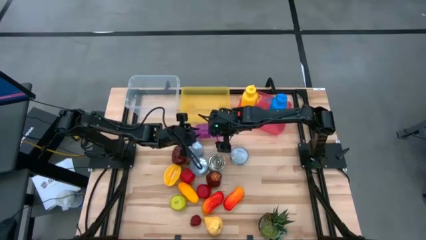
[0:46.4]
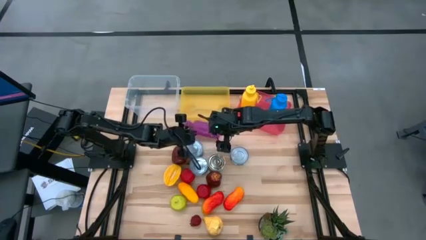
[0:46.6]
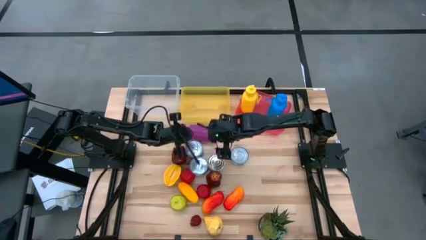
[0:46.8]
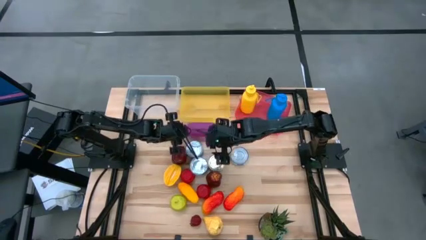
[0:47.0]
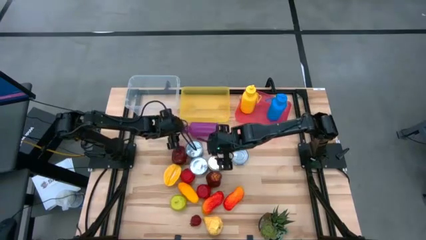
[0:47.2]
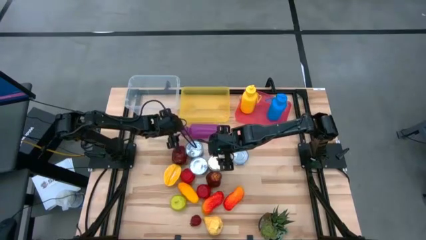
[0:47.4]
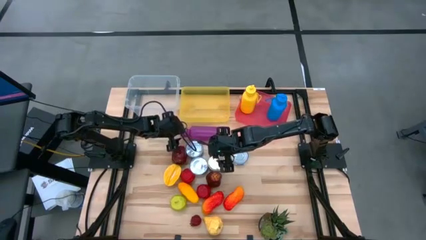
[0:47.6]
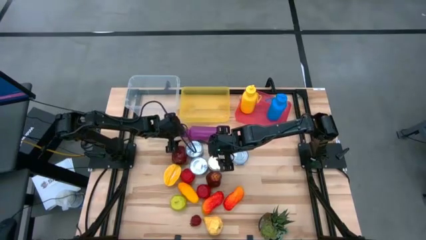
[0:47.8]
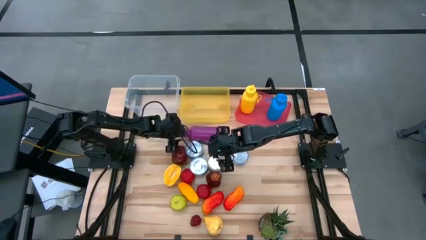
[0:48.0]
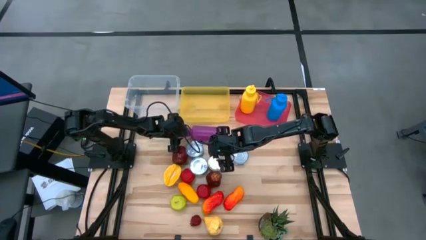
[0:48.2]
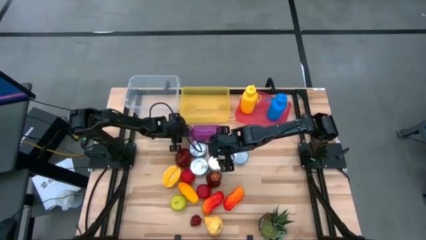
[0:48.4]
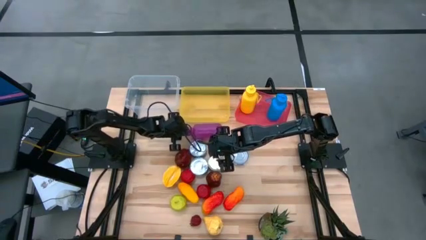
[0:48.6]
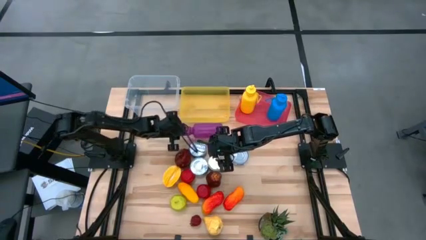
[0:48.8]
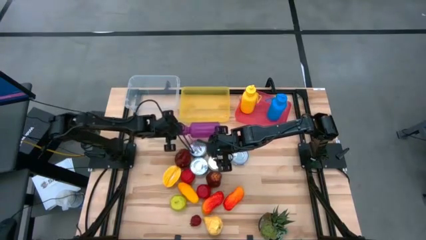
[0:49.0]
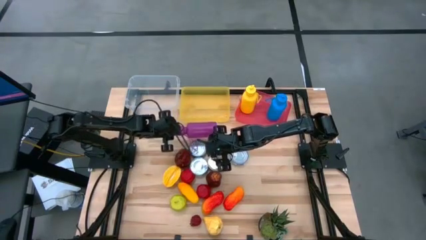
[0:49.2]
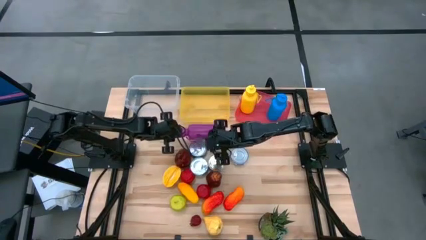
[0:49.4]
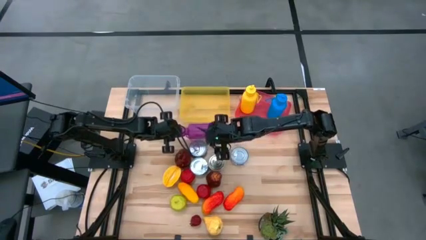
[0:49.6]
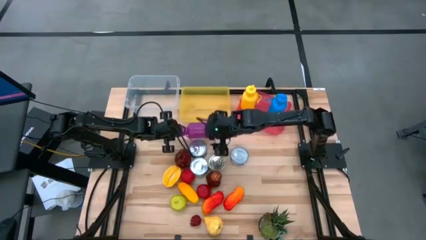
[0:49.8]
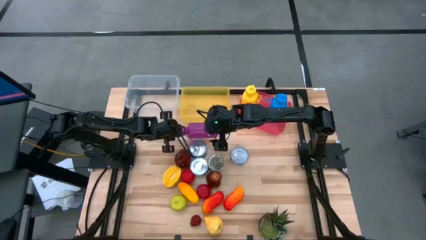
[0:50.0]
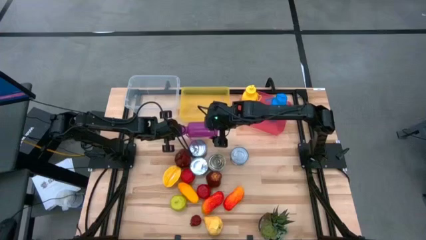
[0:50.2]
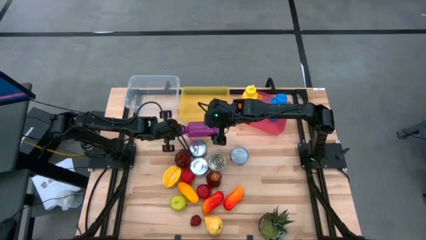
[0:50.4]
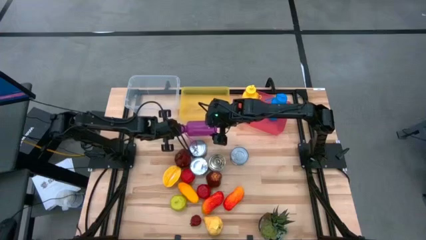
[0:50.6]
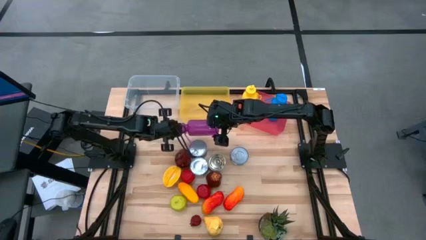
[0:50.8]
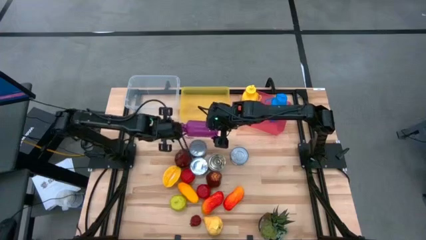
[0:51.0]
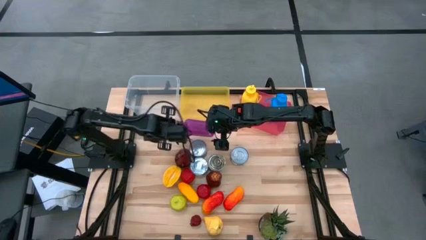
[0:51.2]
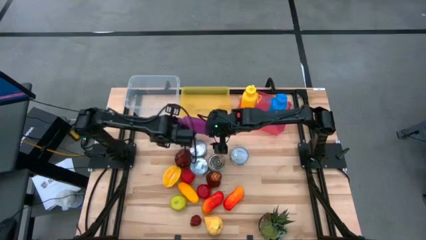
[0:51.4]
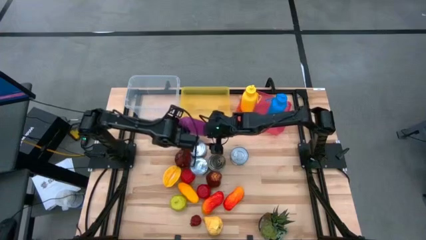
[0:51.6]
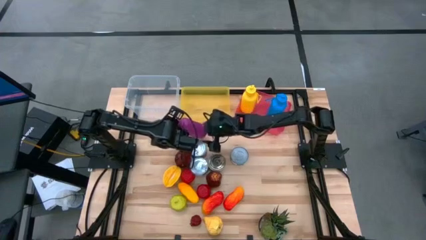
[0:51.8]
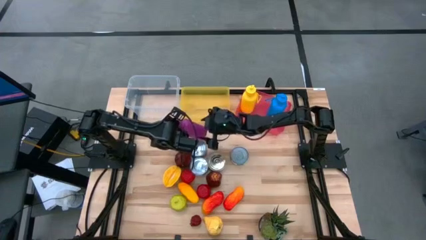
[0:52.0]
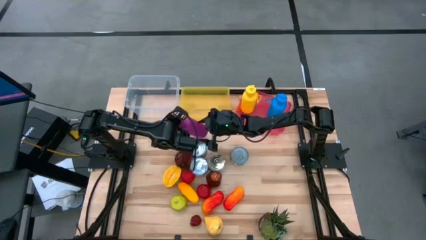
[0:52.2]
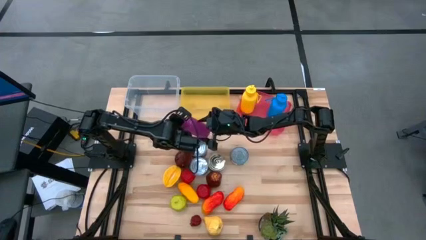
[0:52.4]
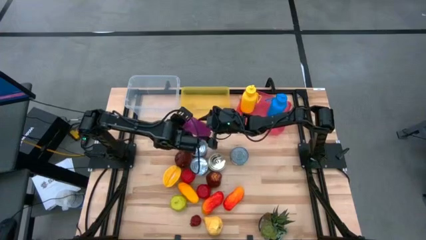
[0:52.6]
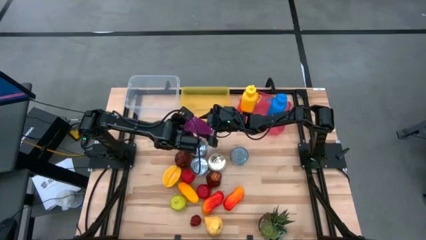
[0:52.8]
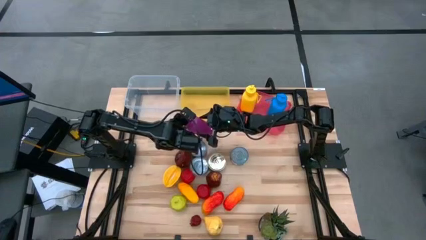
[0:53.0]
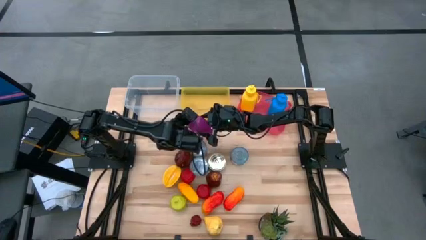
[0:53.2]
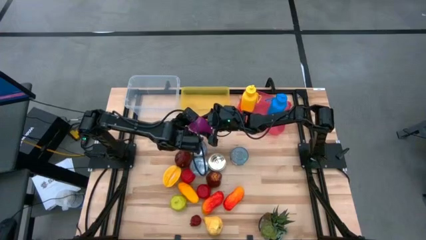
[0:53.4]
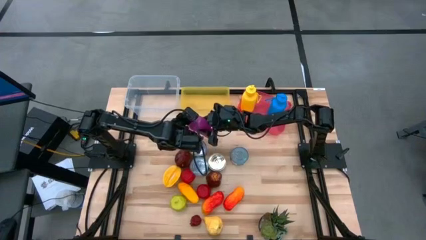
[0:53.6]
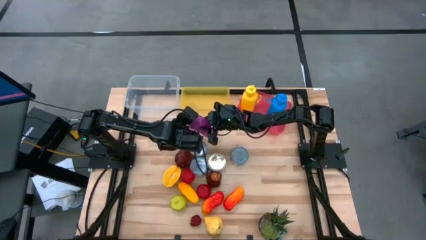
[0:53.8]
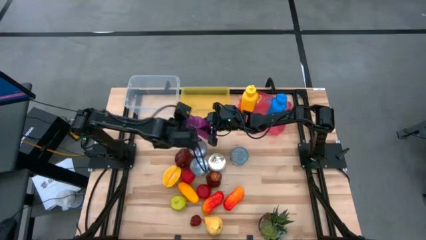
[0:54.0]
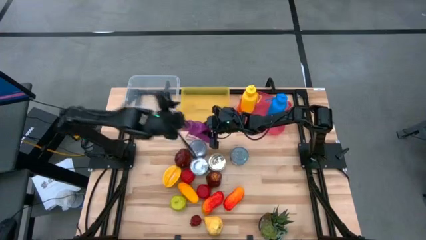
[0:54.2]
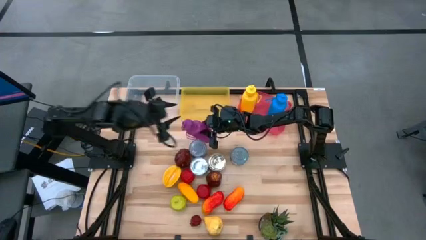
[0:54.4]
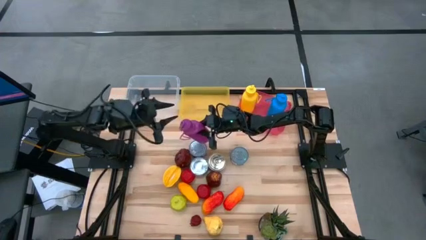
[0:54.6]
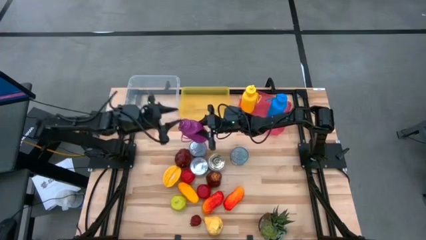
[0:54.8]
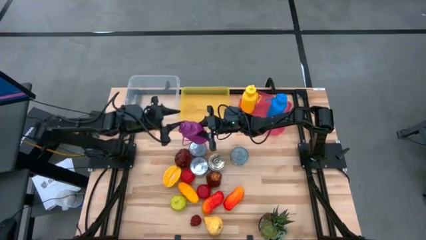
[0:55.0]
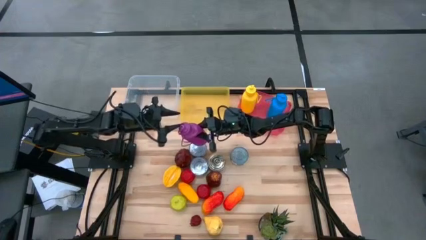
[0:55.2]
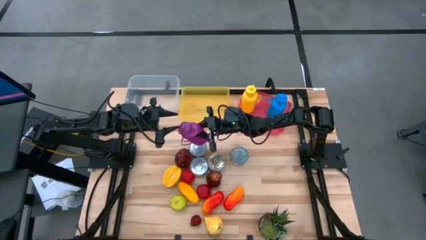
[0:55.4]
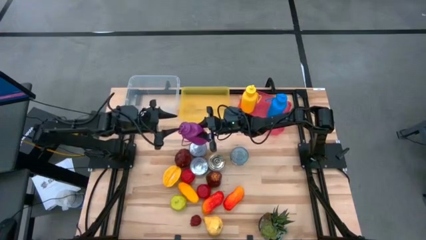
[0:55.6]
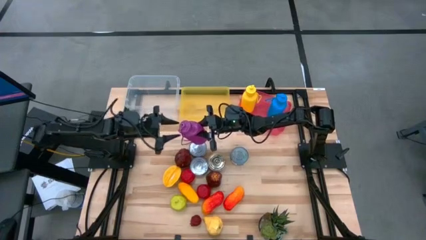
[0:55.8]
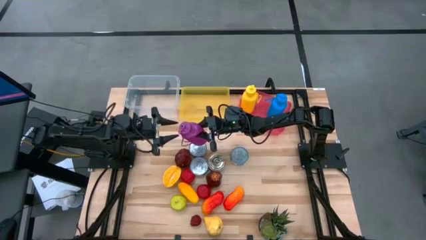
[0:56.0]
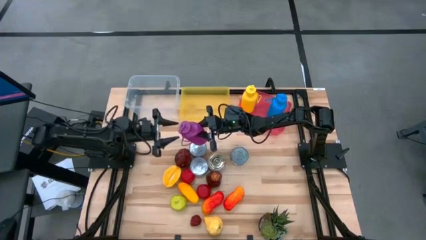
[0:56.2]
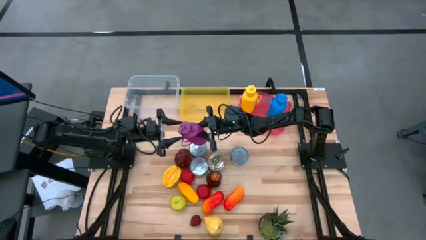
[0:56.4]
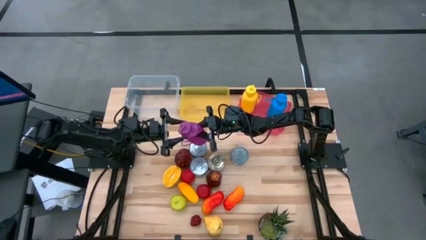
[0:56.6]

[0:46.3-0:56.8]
Task: Pick & Place Food Item
Put the purple water bottle into the pink bin

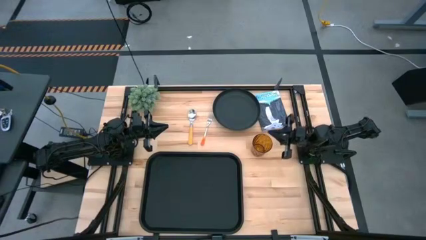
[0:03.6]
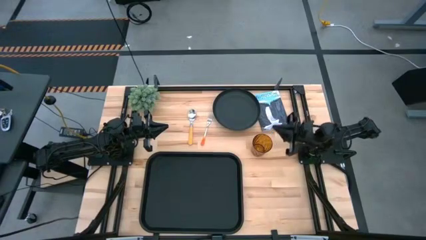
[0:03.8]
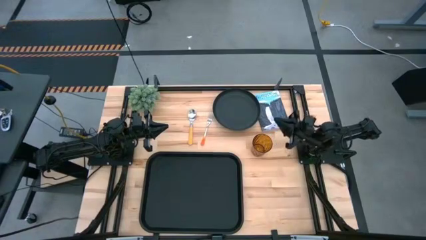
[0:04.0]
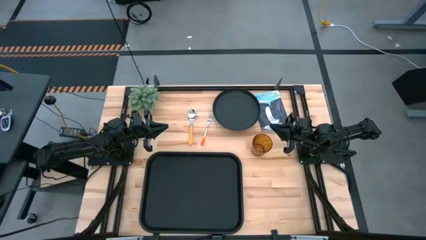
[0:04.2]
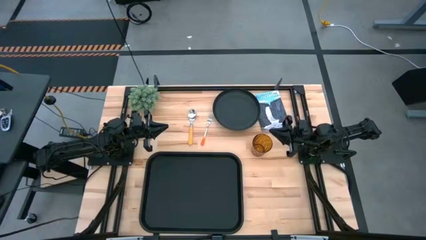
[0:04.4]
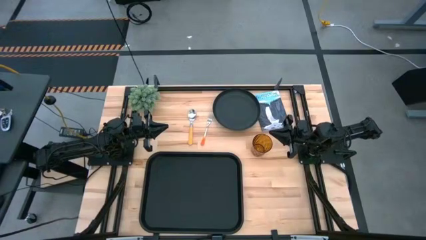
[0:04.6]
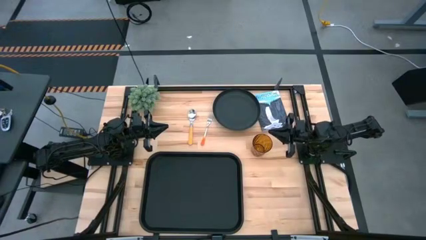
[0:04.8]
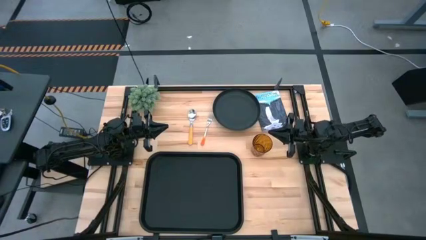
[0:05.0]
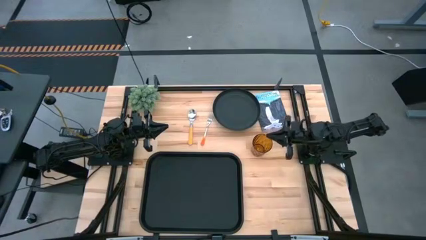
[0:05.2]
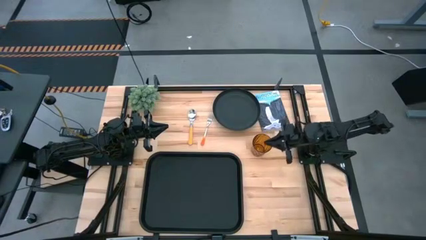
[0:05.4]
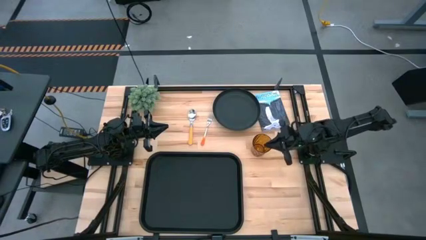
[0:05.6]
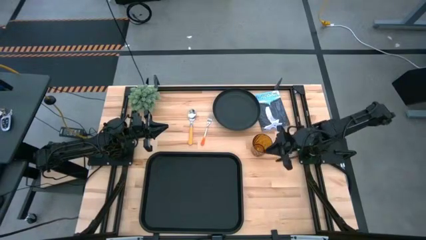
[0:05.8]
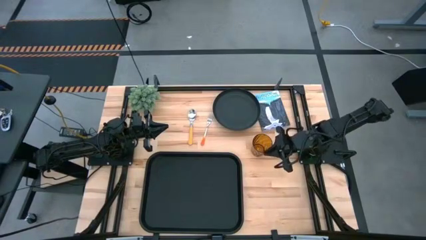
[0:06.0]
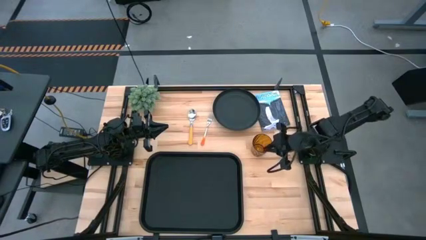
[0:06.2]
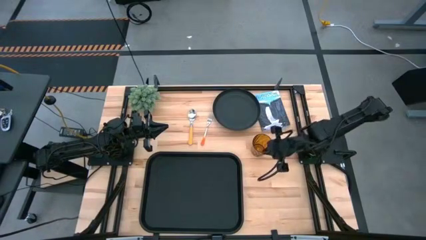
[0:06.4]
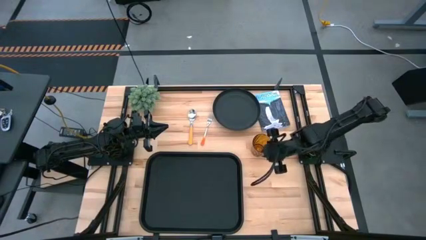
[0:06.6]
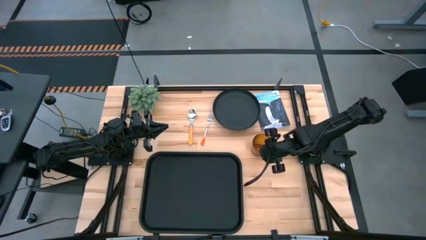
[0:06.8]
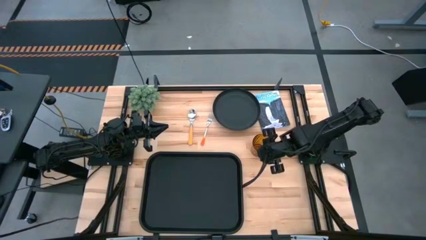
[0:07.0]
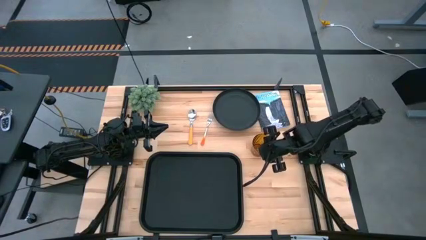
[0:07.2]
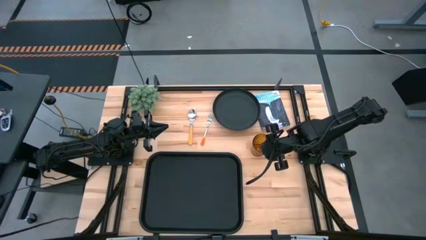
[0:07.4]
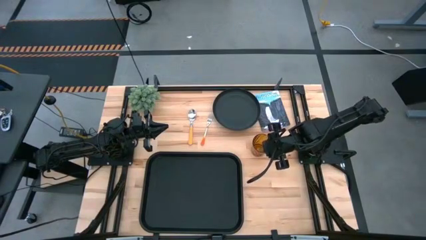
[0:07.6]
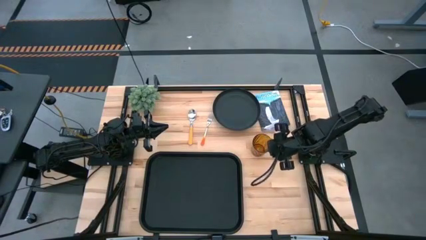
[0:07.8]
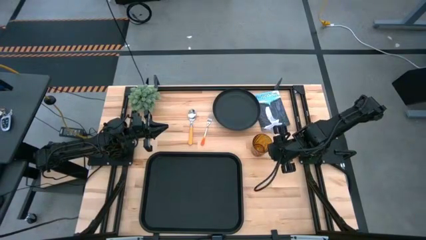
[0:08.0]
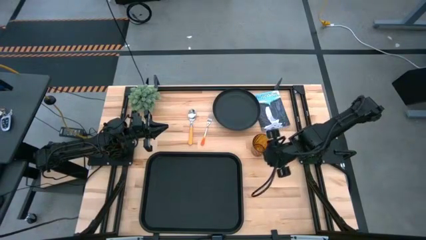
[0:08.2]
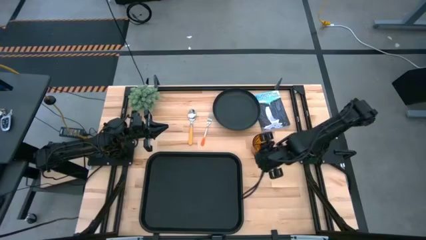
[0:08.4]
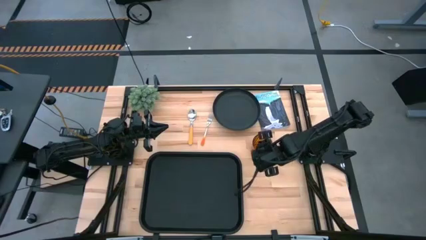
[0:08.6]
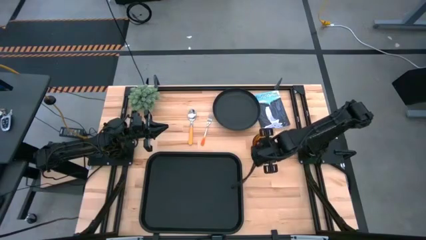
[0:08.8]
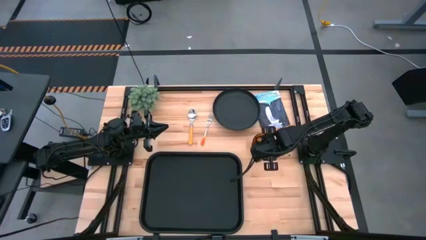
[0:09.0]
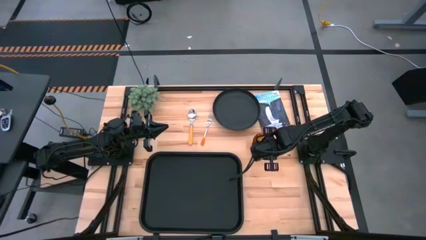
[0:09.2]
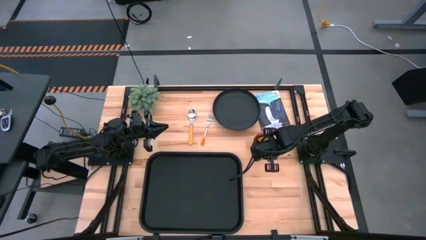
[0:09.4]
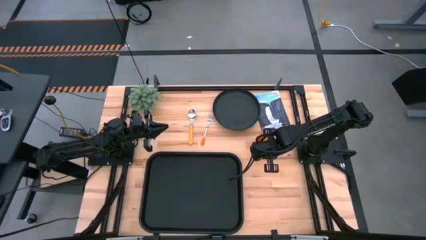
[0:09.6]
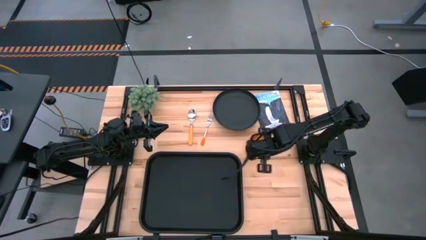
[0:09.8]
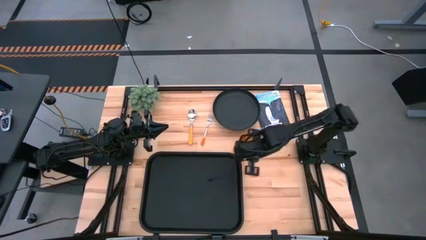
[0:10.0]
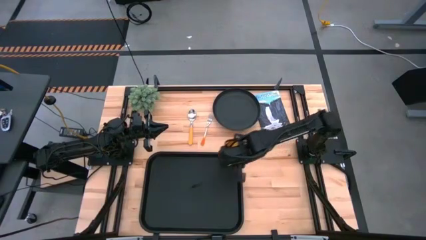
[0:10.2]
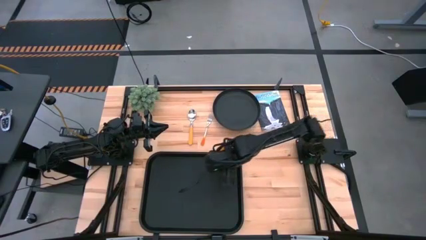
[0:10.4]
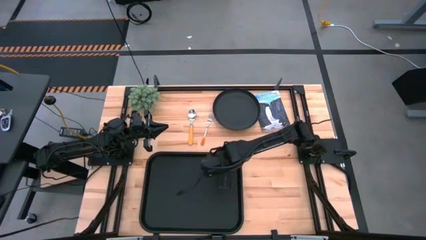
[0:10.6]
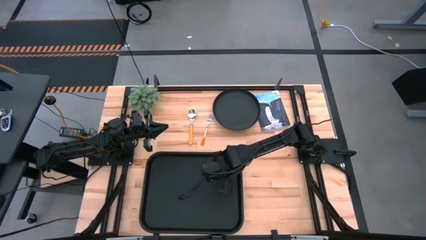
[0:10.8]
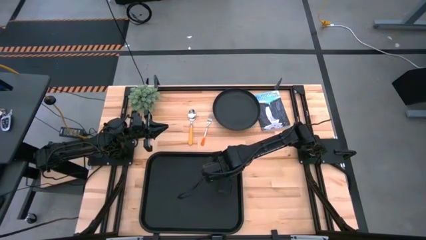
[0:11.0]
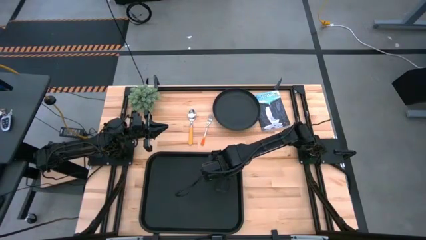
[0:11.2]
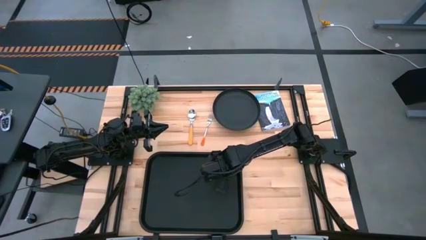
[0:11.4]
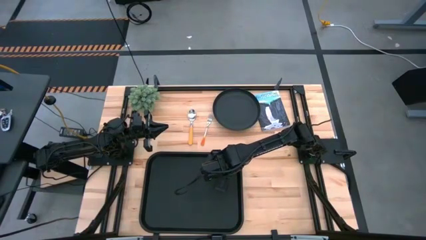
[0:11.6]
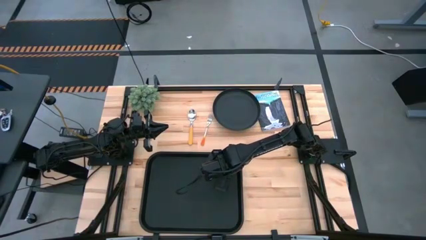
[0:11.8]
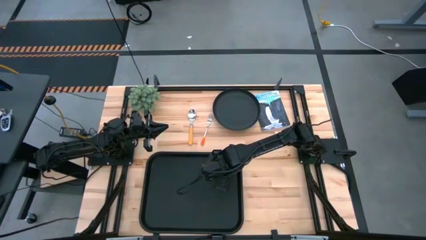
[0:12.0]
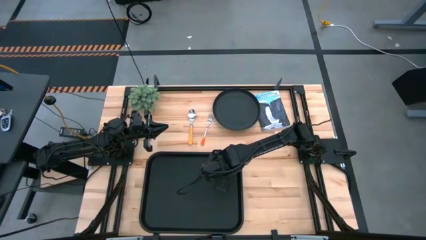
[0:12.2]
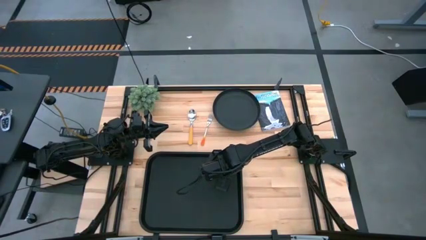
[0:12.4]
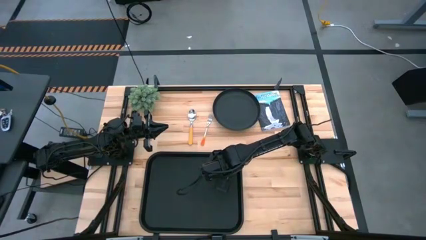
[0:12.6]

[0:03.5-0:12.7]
Task: Pick and place plate/cup/fork/spoon on tray
Put the brown glass on the top right of the black serving tray
